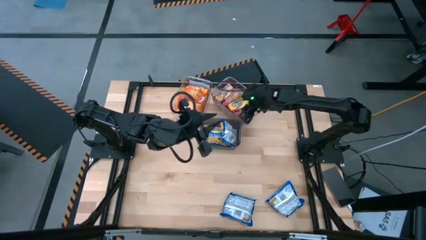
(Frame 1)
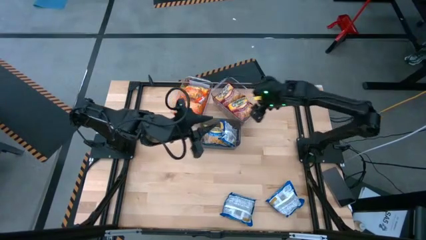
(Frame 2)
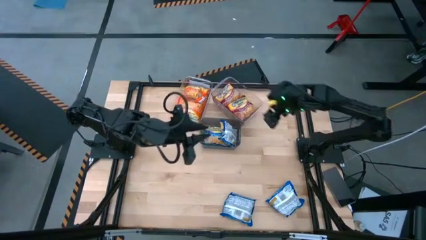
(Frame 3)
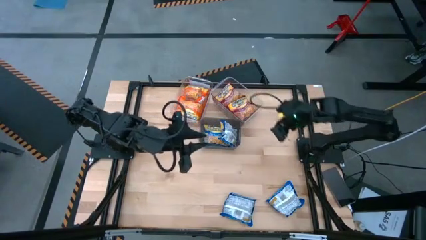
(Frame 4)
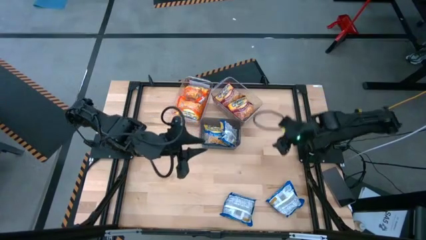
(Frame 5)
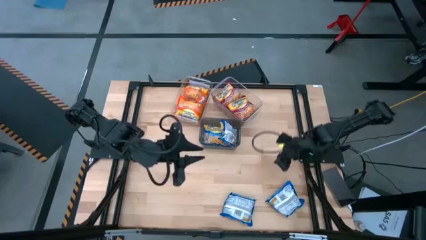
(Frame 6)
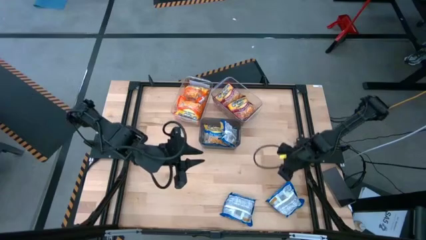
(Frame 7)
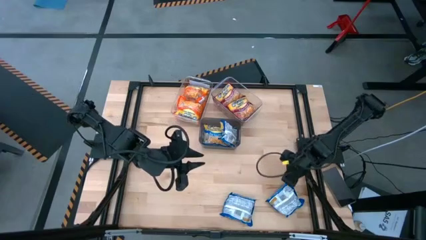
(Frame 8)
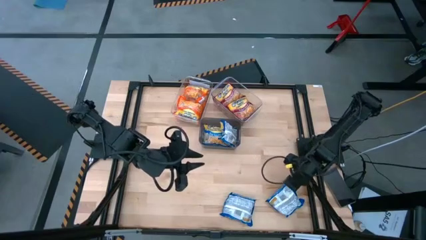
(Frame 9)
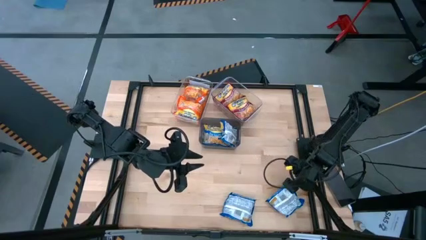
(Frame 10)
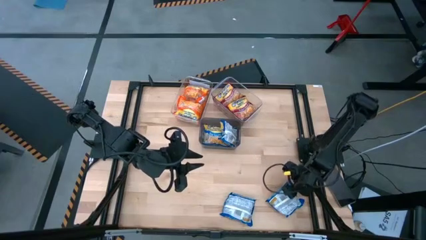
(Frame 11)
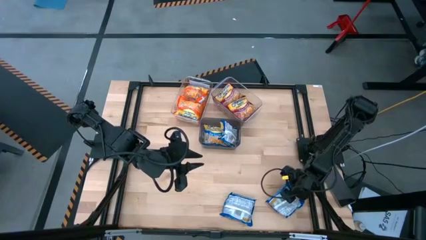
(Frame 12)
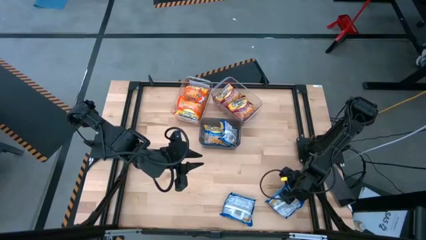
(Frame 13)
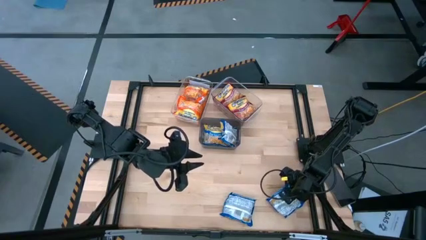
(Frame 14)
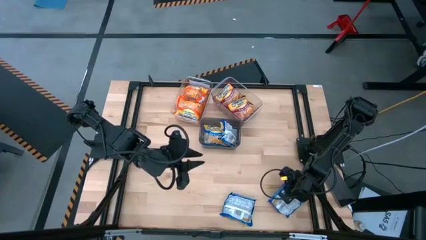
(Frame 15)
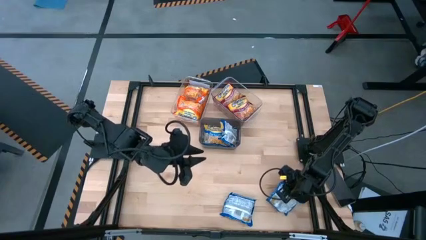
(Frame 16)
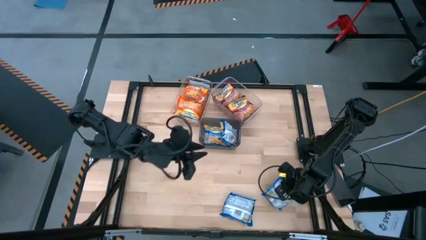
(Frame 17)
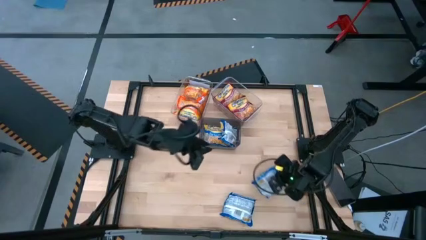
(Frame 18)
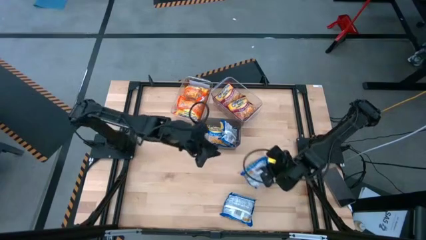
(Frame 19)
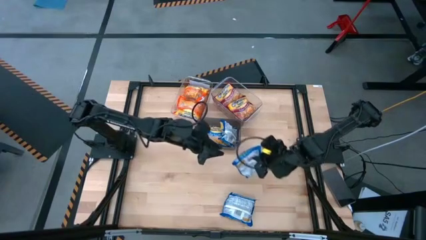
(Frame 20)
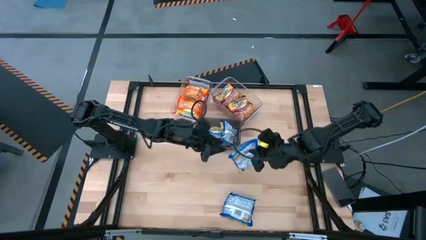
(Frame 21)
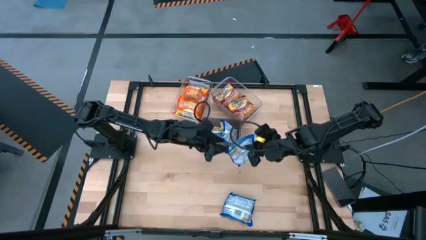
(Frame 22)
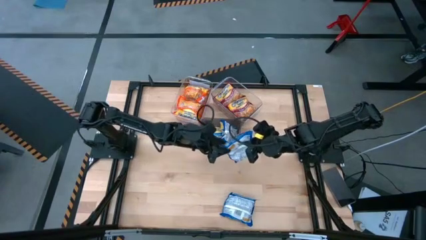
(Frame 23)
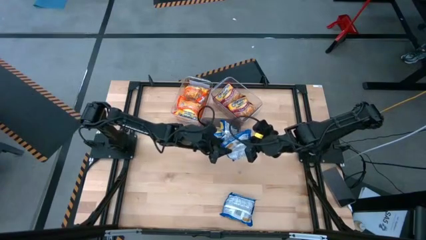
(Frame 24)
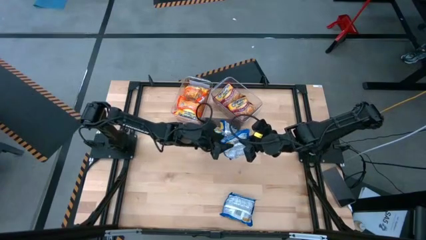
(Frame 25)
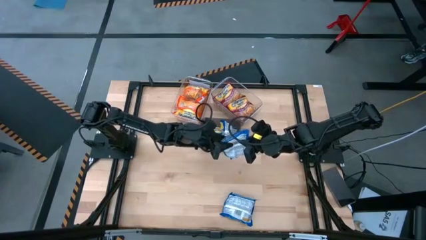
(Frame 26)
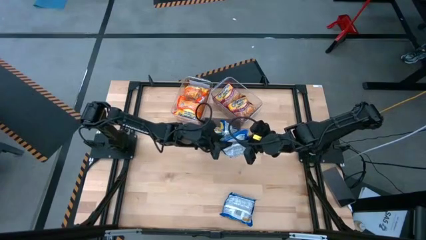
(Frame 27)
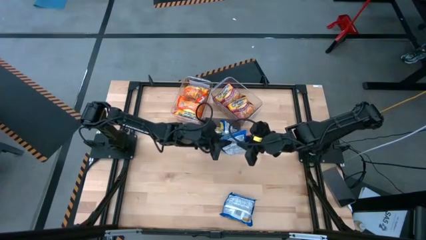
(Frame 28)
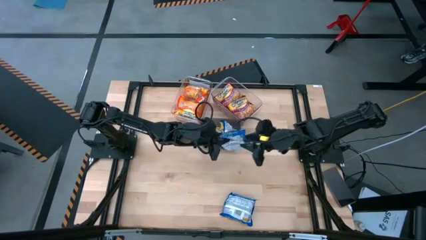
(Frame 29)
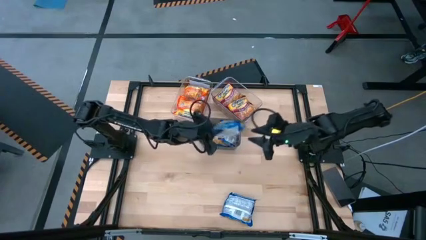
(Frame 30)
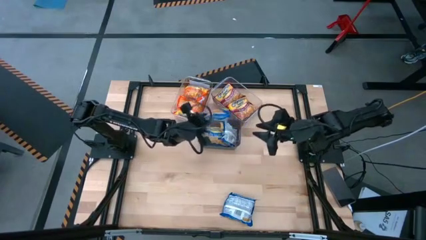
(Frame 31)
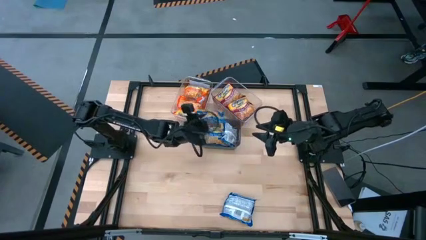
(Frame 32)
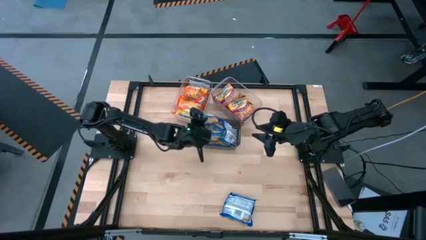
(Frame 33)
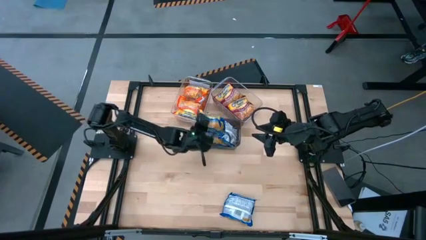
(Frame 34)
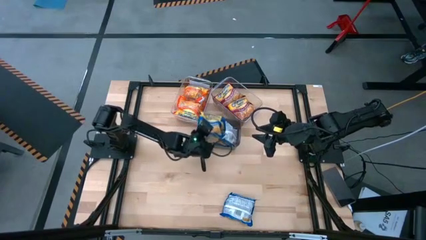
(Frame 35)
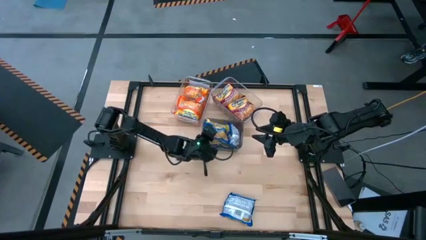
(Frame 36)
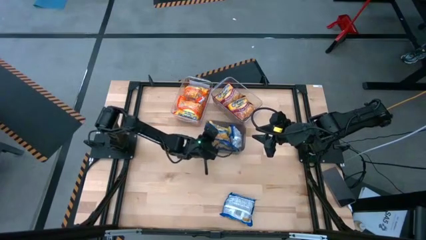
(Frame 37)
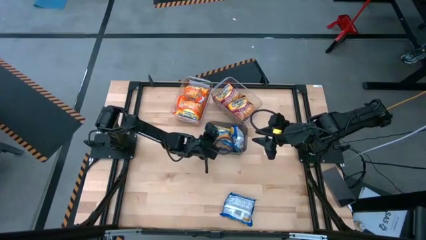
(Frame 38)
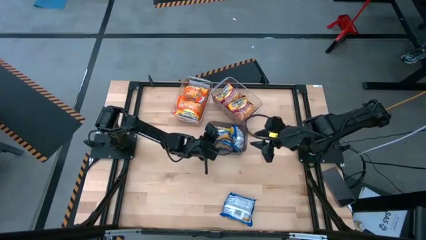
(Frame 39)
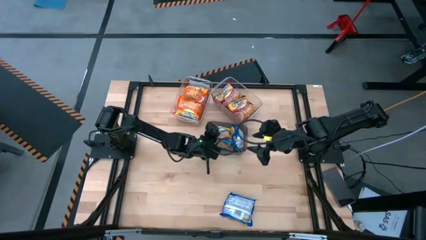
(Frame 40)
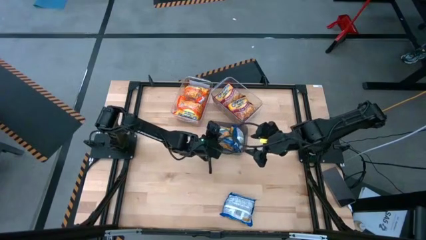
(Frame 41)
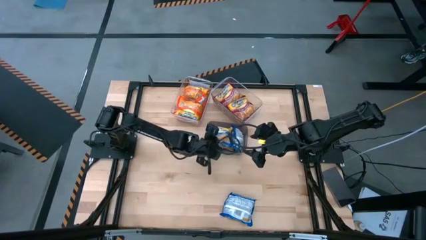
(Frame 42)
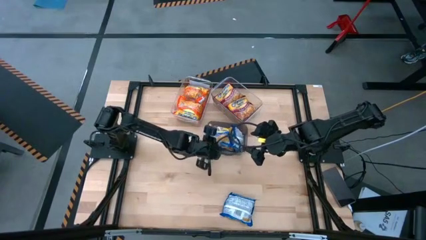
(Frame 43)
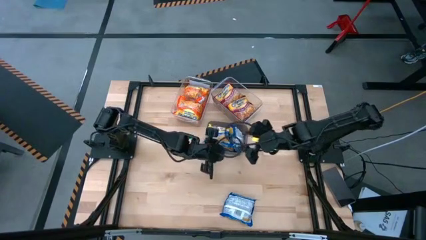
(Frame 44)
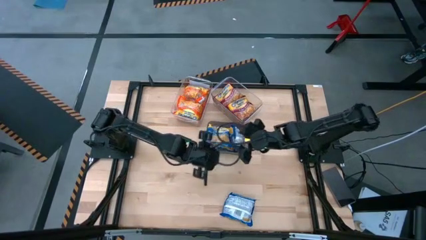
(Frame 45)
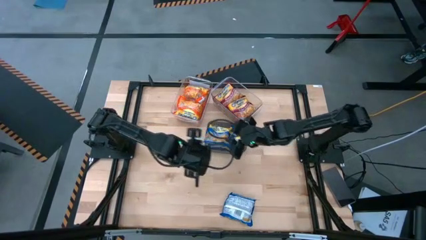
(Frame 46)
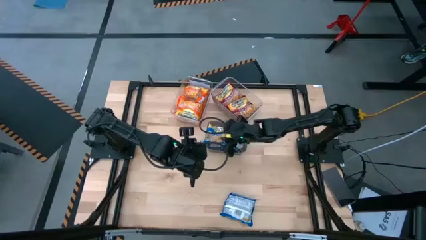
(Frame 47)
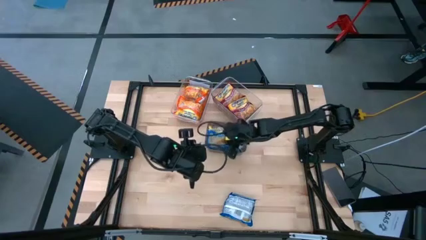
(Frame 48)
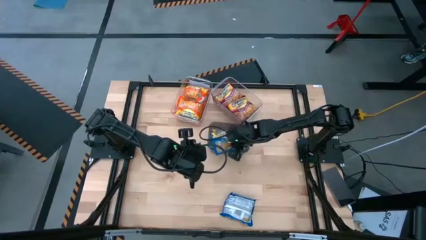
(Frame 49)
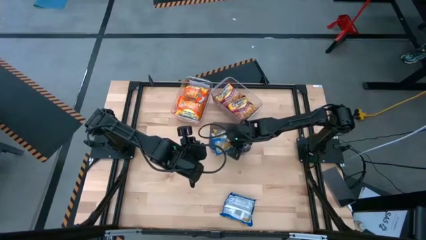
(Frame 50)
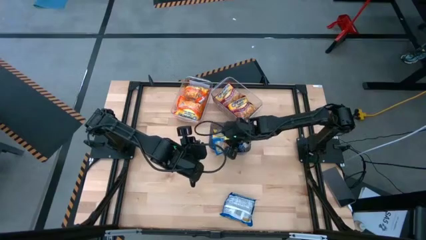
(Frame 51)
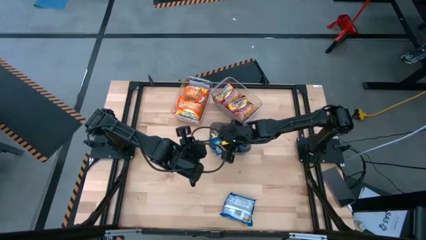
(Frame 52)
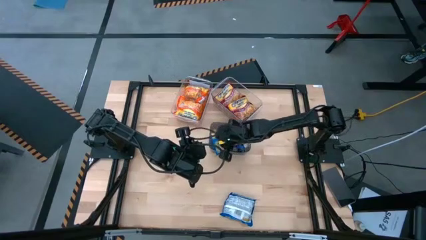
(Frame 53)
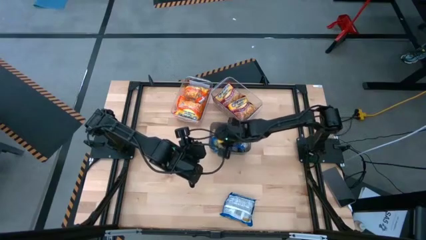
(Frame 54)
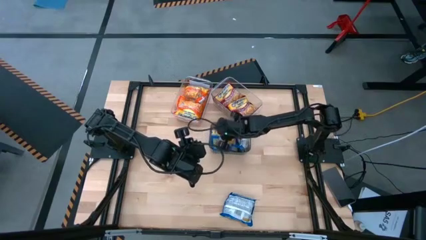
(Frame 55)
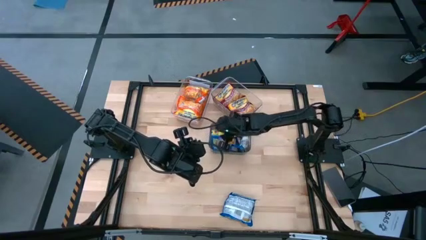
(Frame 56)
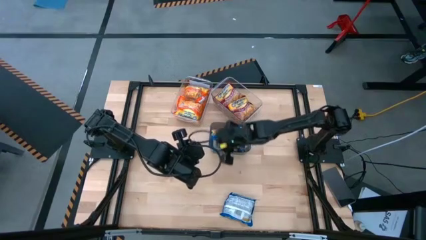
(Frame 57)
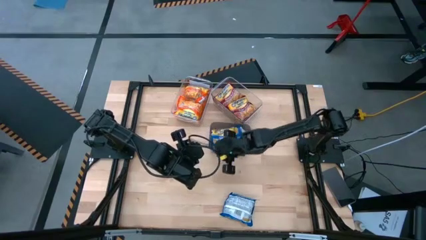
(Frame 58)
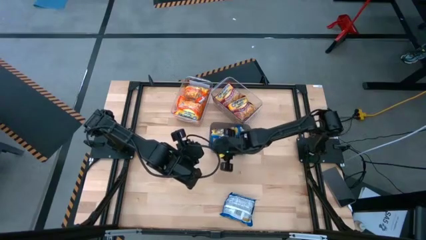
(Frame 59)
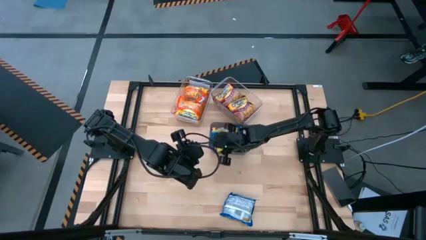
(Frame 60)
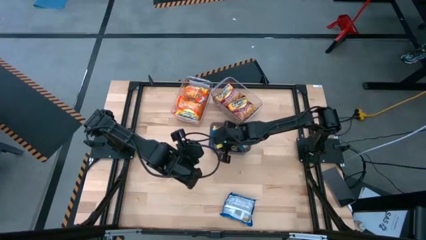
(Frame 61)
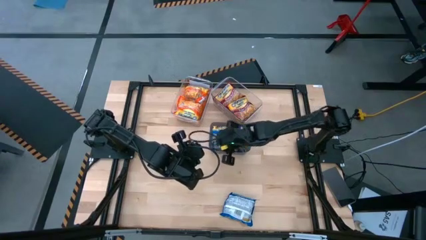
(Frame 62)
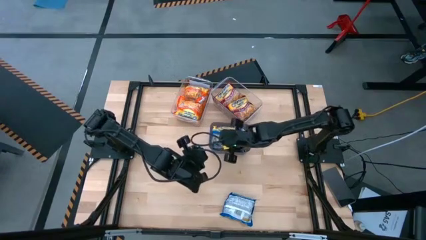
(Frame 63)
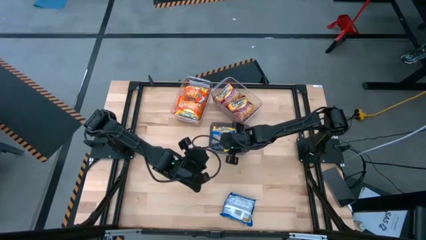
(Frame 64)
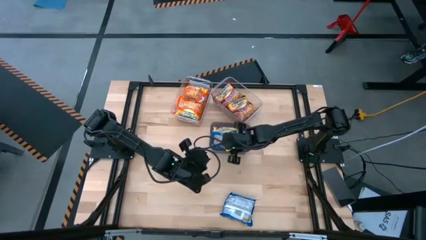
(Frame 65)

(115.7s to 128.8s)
Task: Sort Maruchan noodles
Put the blue noodle pack into the black transparent bin
